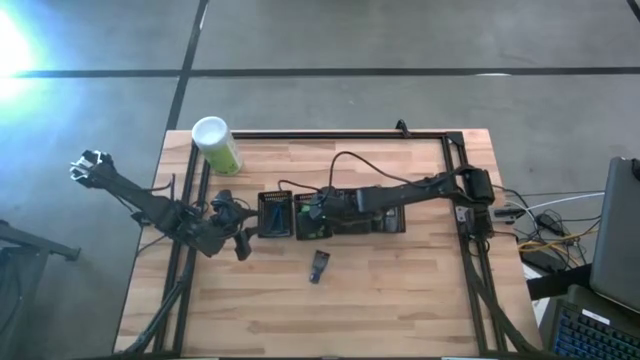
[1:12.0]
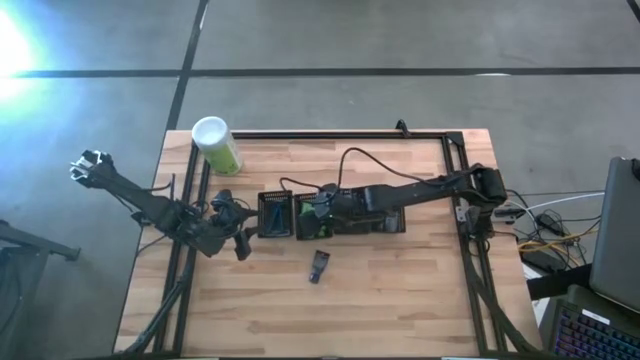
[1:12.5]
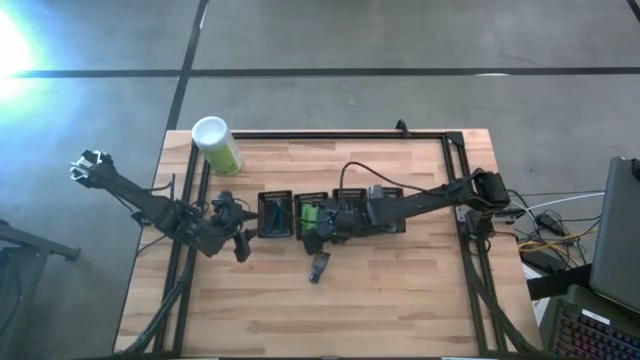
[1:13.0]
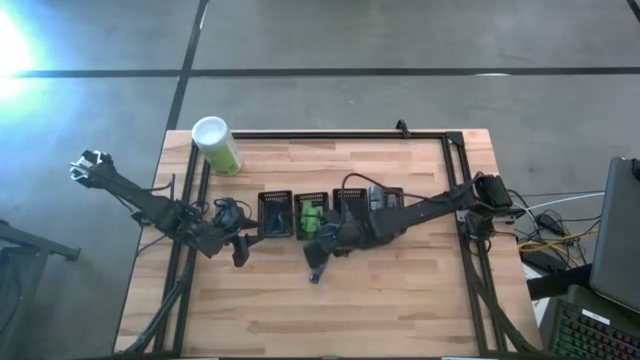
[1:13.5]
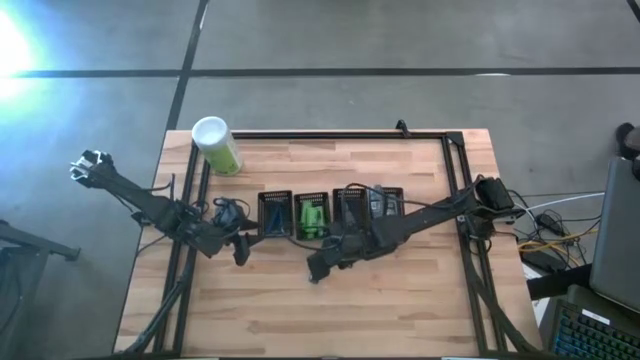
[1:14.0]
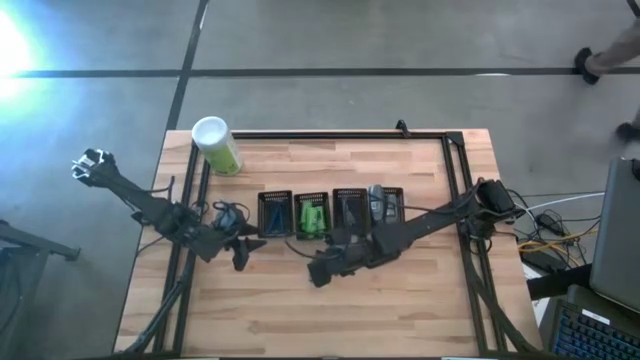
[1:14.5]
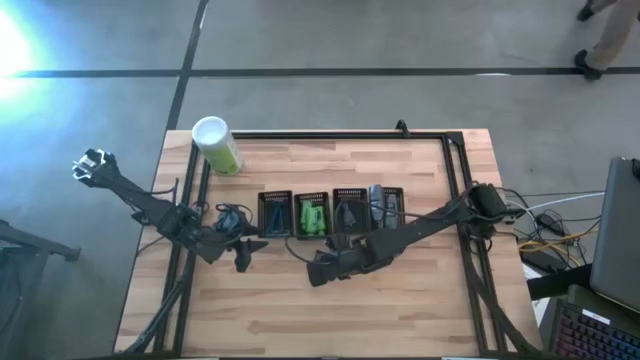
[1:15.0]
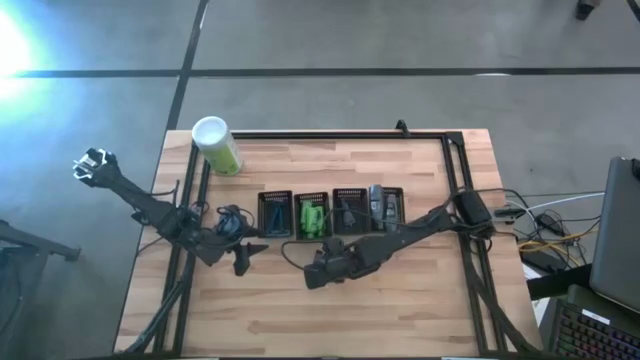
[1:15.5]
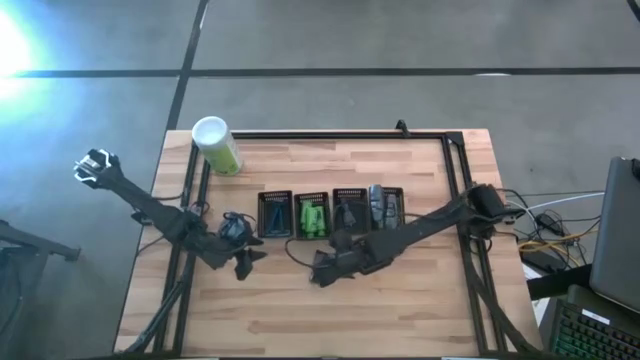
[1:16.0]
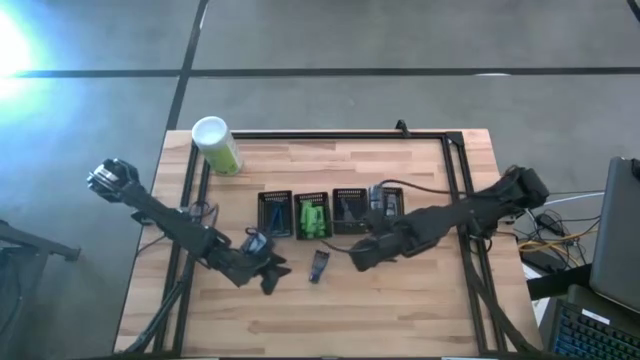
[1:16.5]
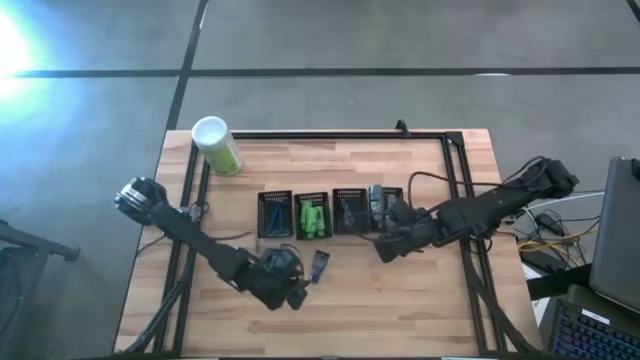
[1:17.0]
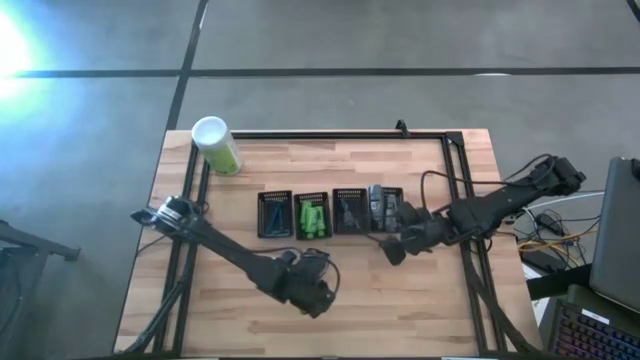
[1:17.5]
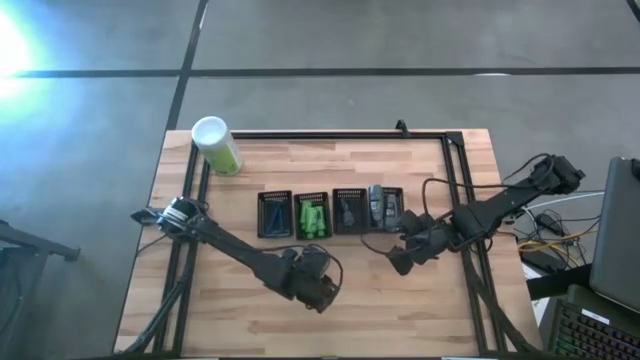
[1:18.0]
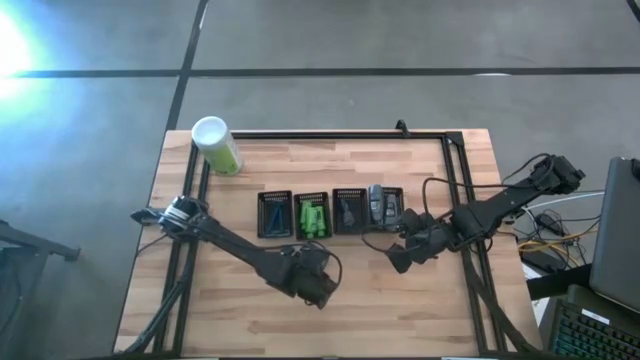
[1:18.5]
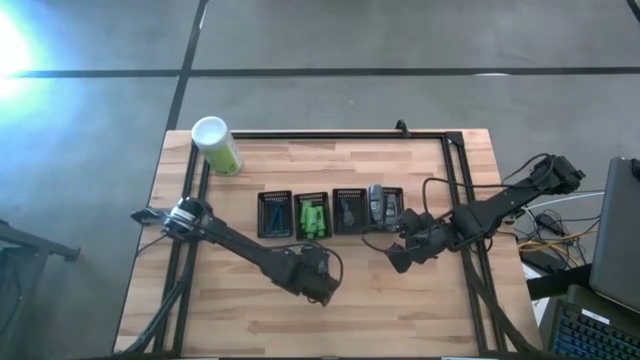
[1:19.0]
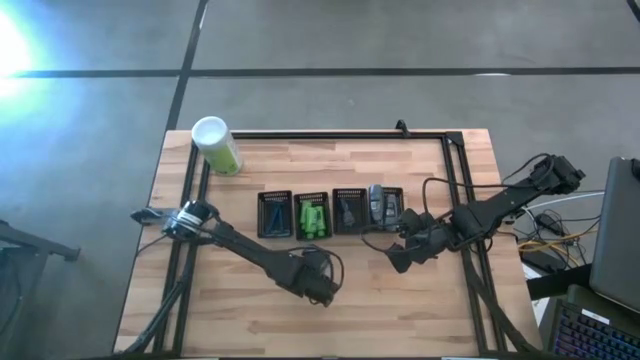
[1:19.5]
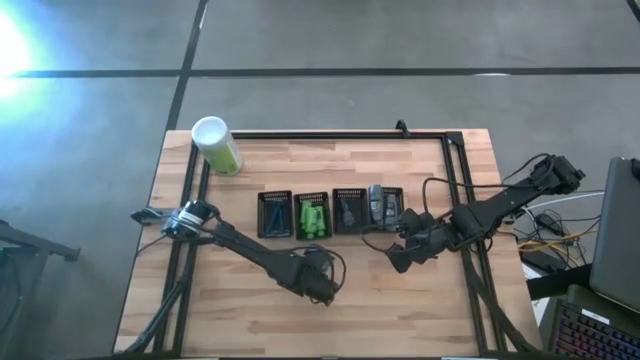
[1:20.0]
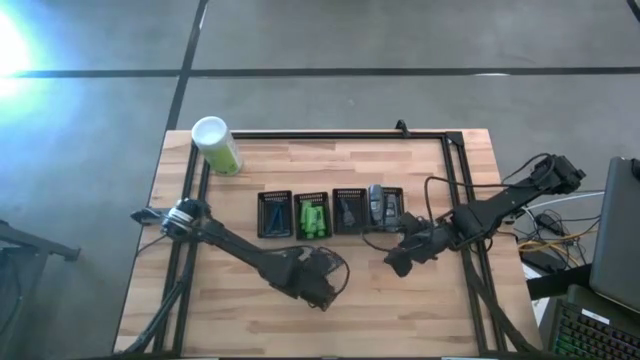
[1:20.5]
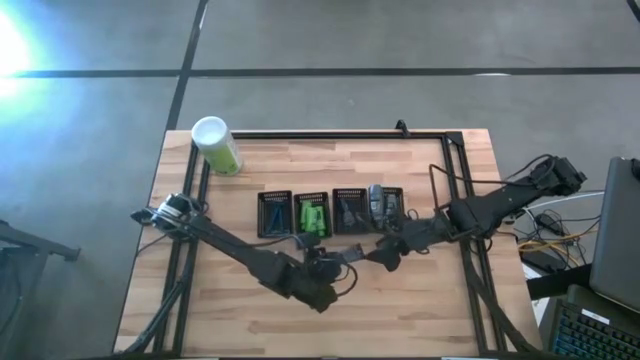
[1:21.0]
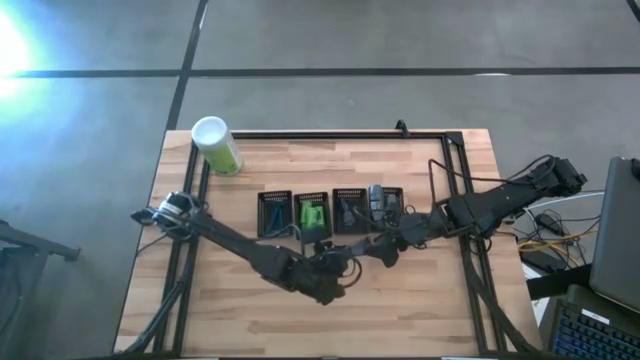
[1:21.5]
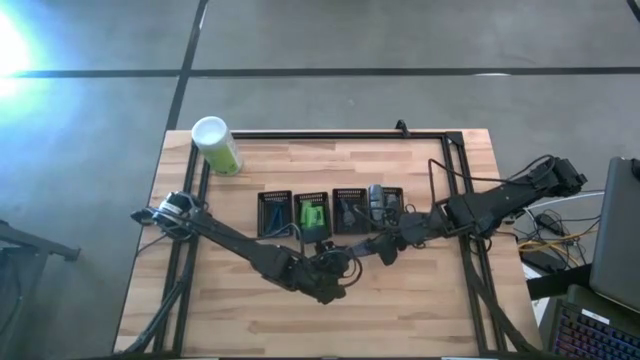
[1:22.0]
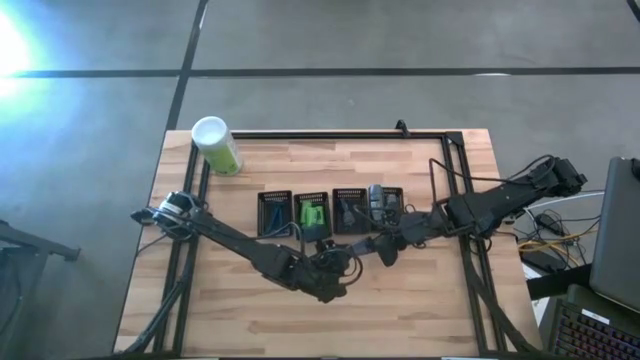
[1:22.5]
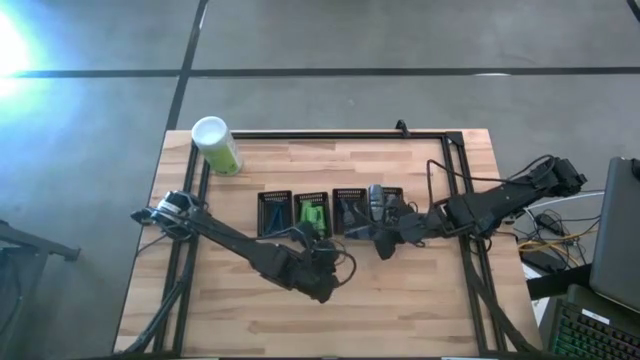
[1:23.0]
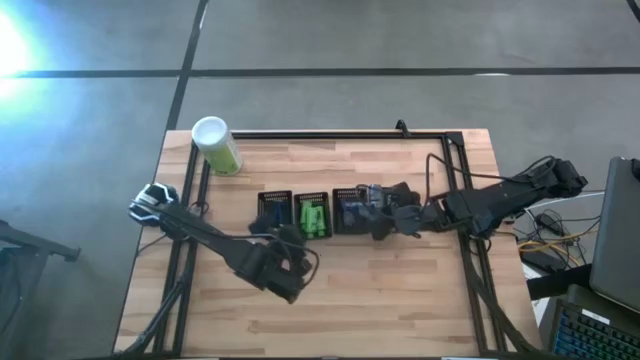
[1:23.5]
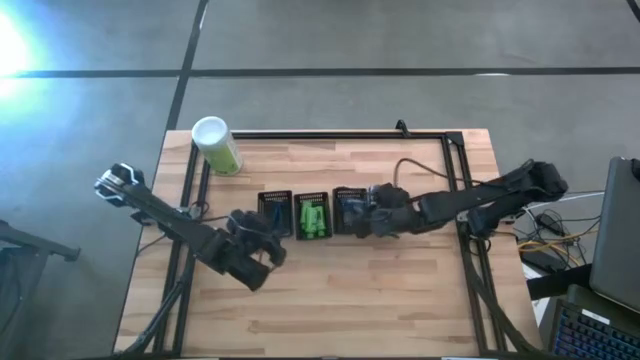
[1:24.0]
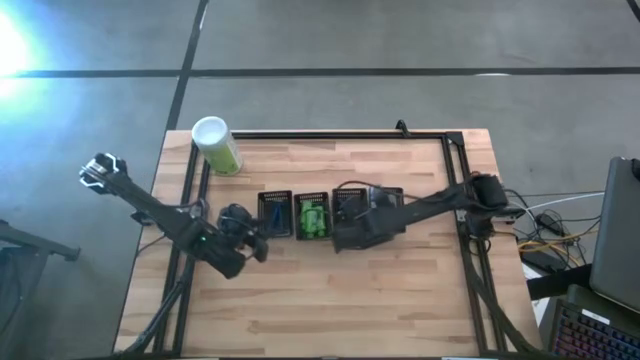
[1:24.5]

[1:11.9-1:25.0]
Task: Pick & Place Travel size toiletries
Put the blue shave cream into the middle right black basket

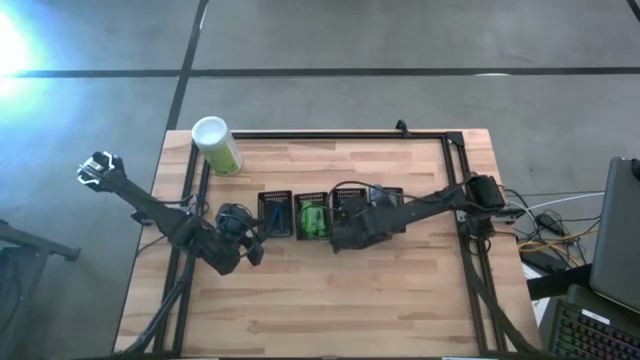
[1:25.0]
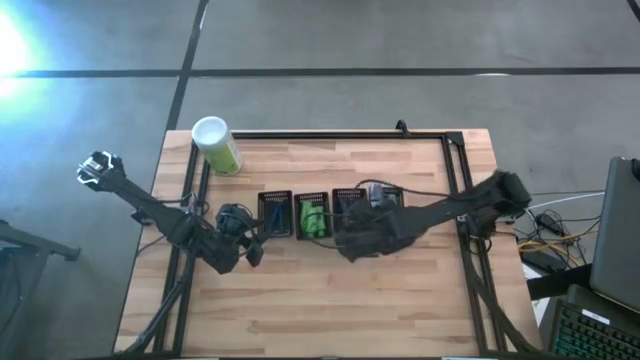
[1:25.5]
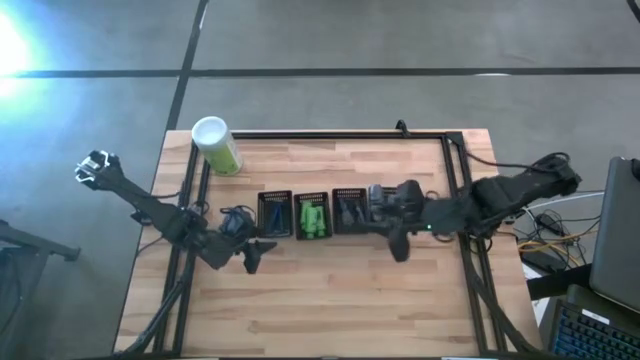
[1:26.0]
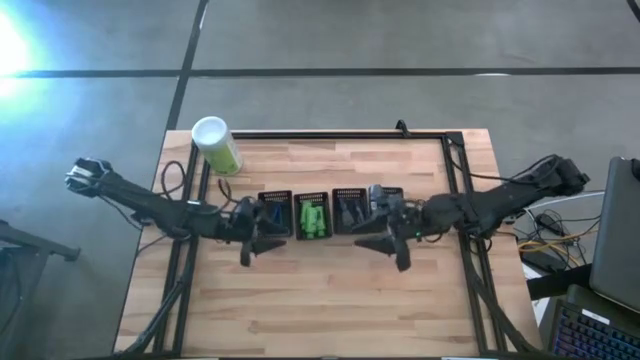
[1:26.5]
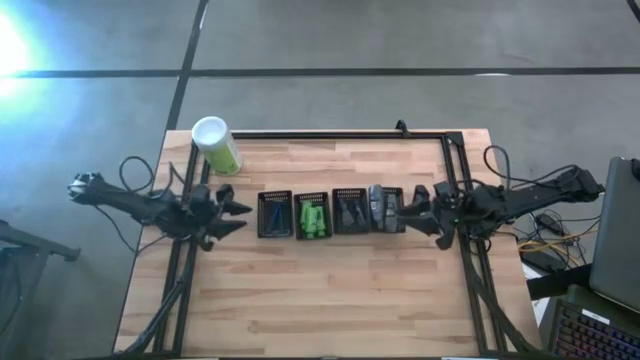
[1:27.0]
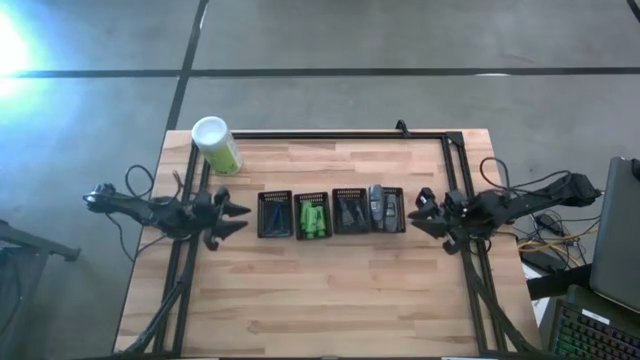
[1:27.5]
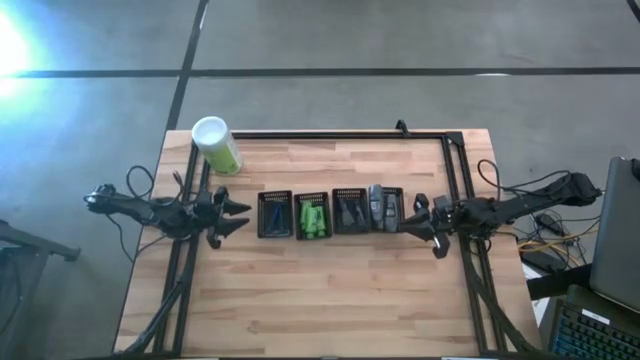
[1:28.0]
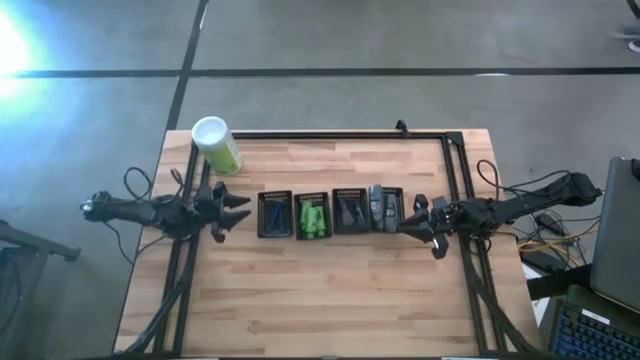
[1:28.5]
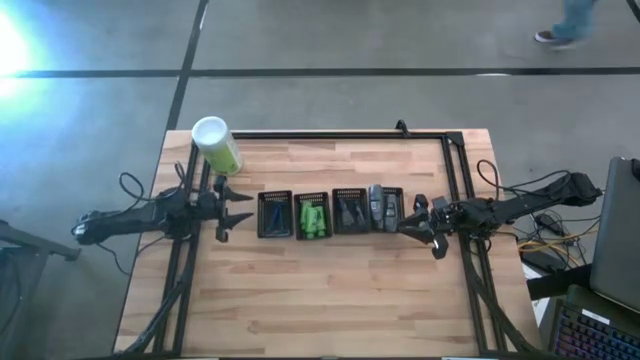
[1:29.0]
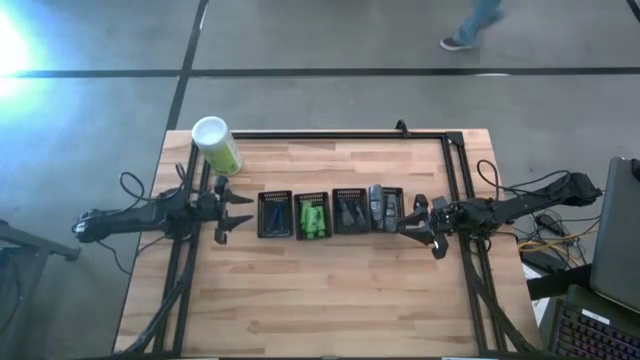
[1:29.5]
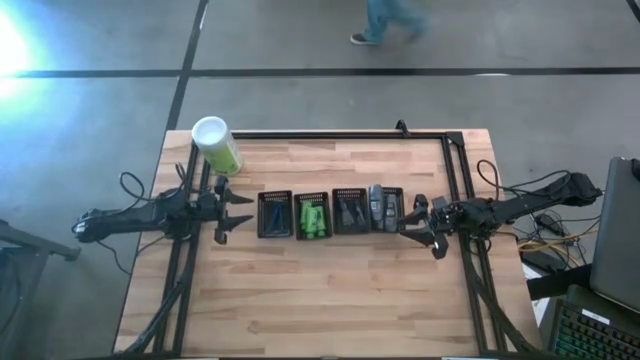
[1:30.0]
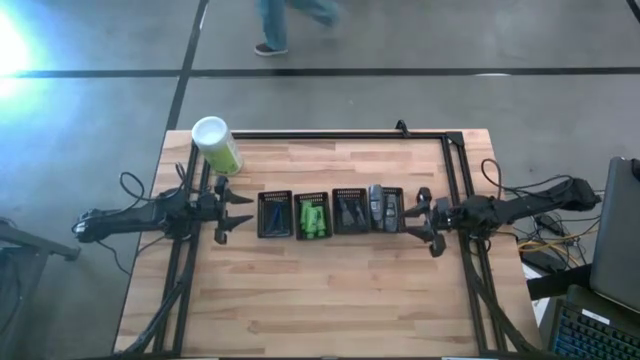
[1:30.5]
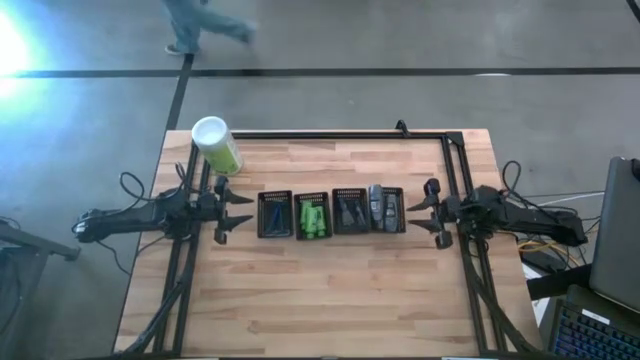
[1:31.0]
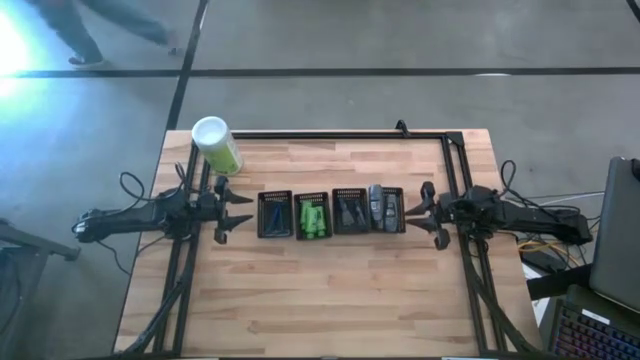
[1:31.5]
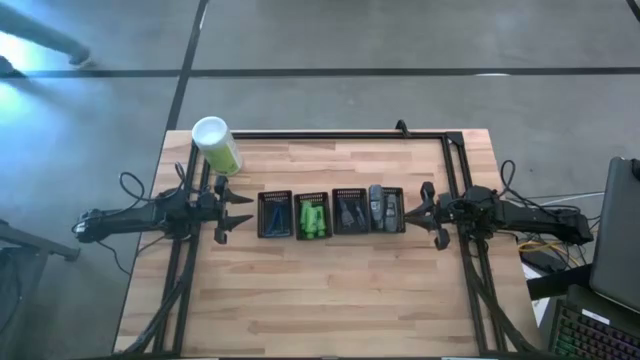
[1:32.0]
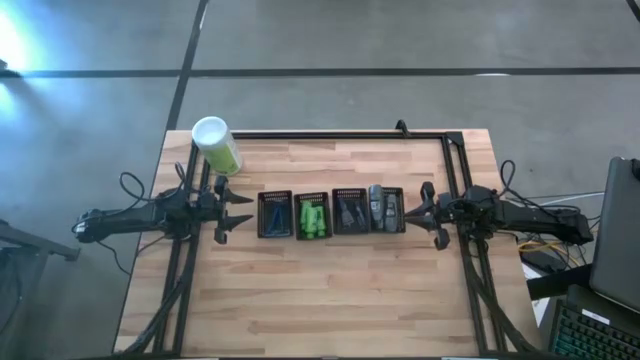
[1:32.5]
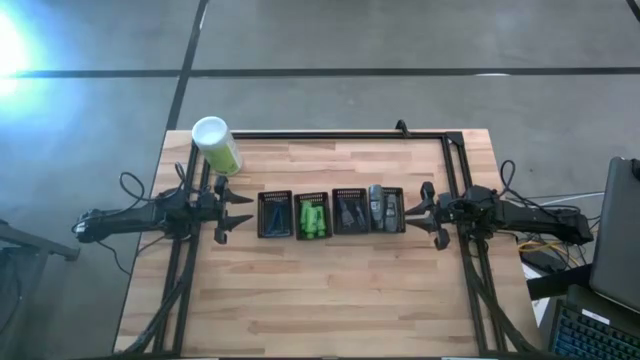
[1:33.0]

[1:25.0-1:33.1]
Return to Home Position
